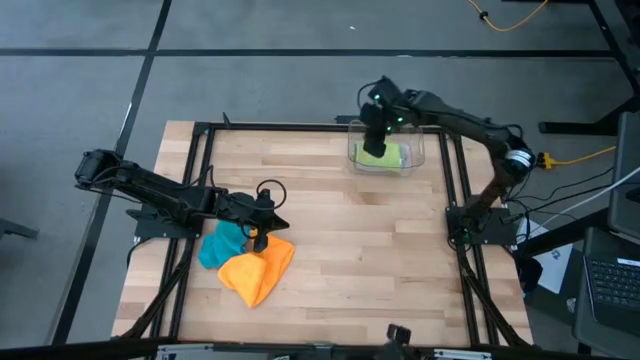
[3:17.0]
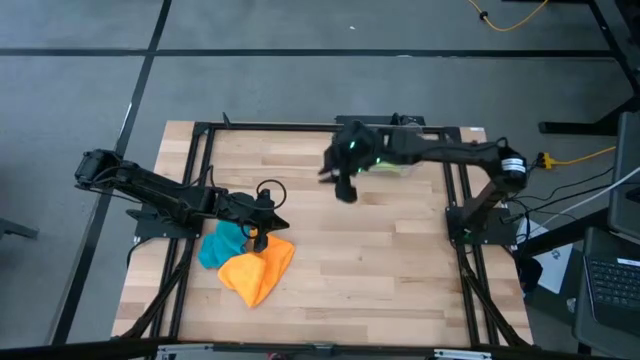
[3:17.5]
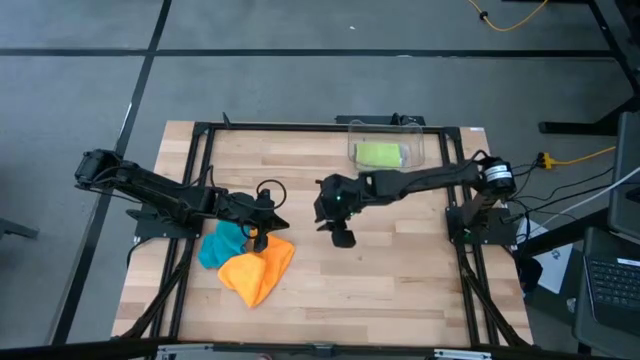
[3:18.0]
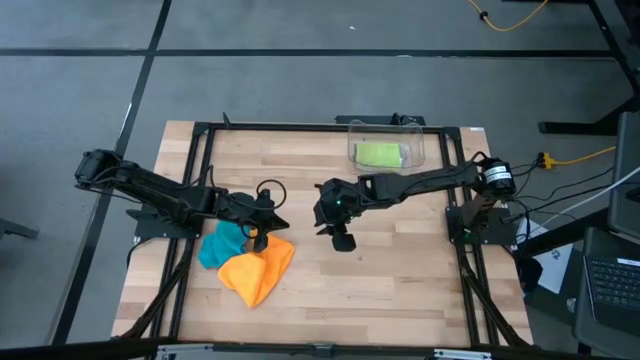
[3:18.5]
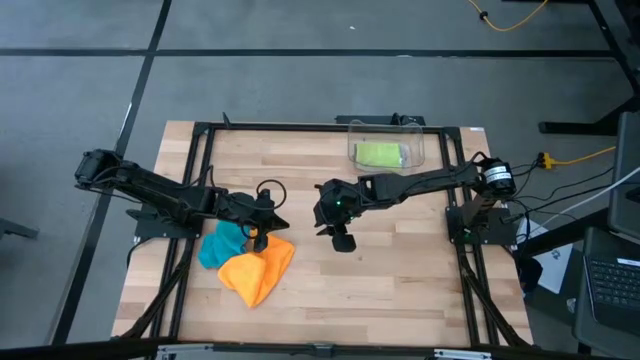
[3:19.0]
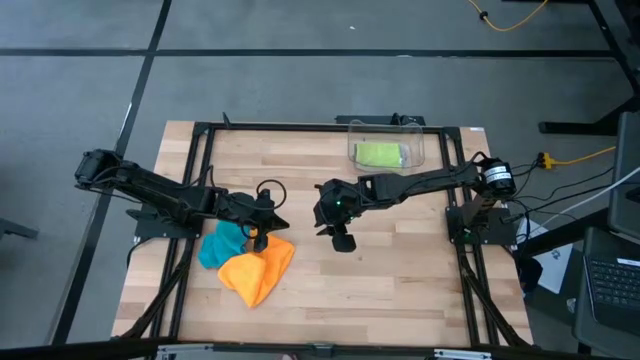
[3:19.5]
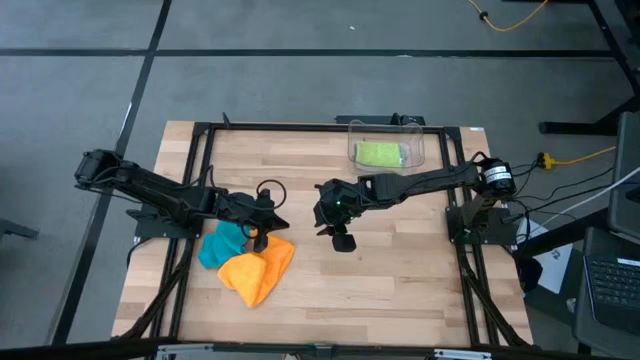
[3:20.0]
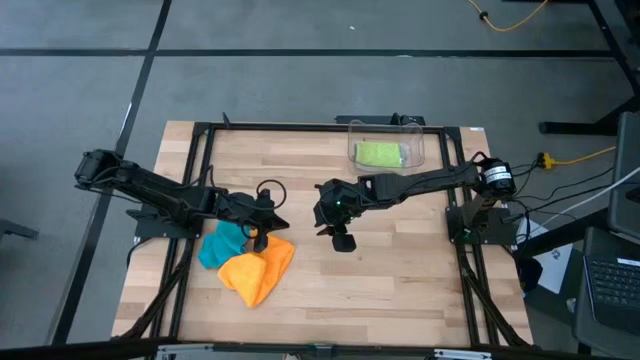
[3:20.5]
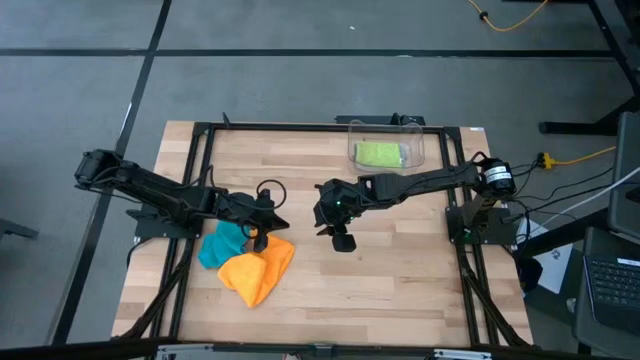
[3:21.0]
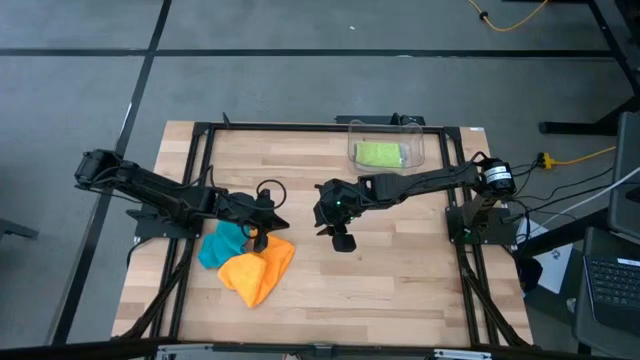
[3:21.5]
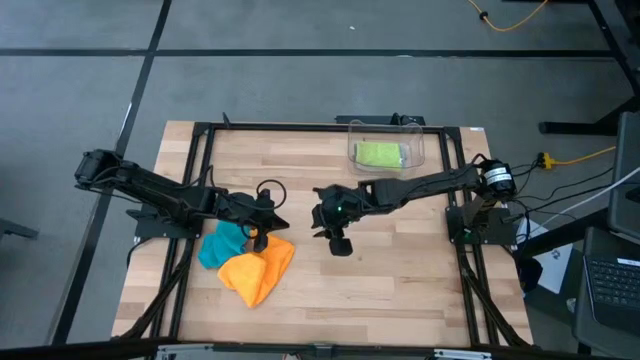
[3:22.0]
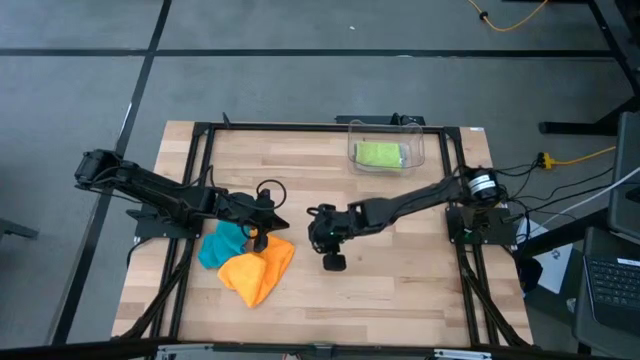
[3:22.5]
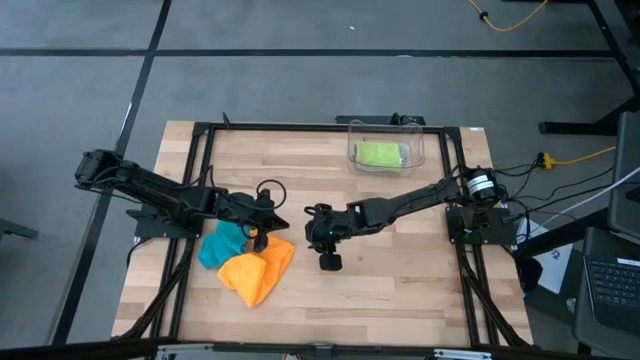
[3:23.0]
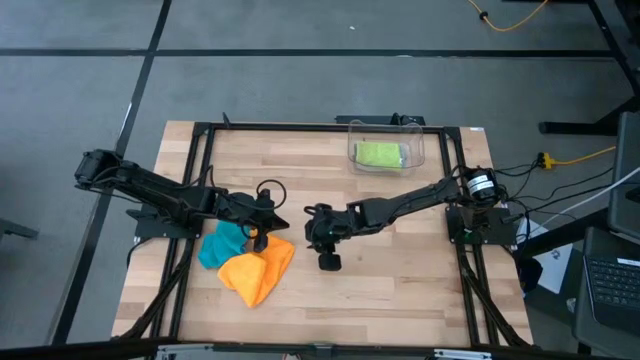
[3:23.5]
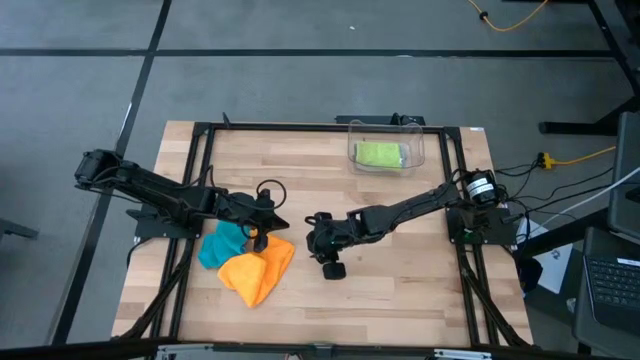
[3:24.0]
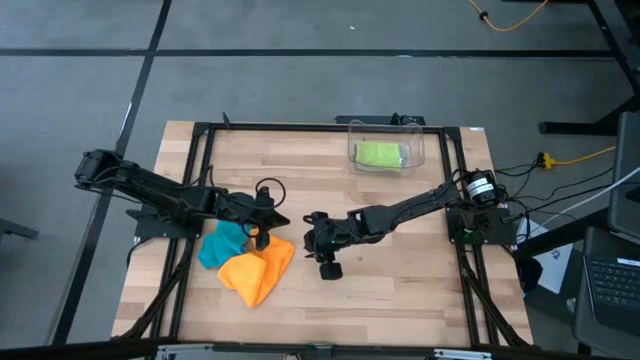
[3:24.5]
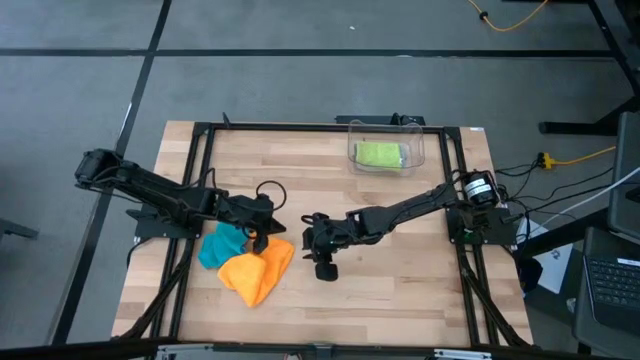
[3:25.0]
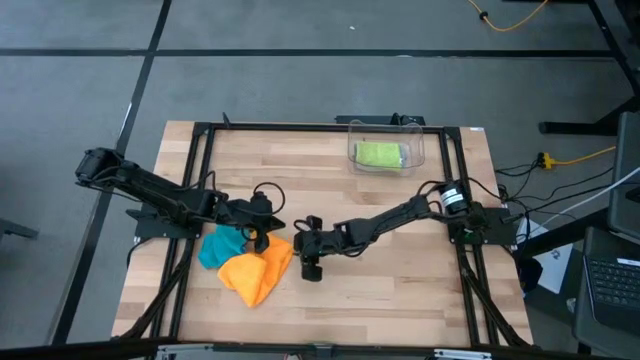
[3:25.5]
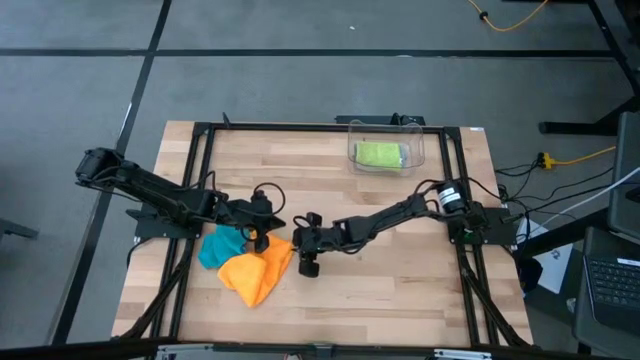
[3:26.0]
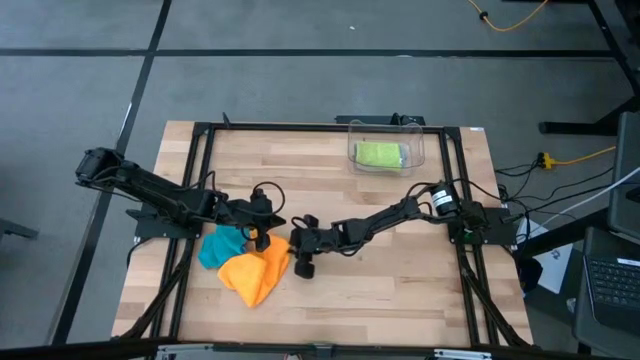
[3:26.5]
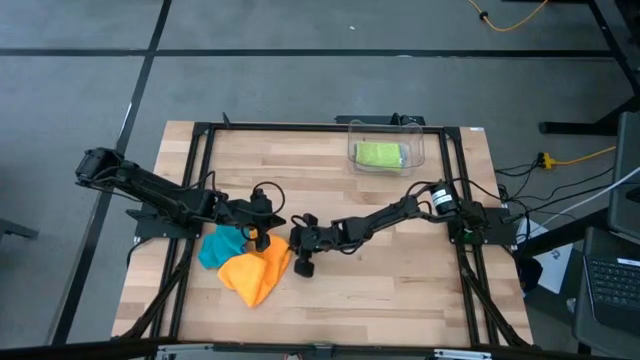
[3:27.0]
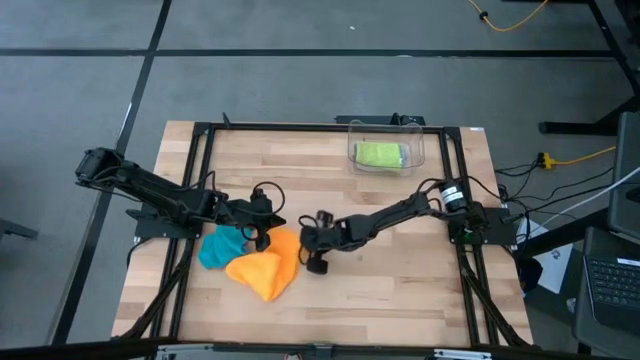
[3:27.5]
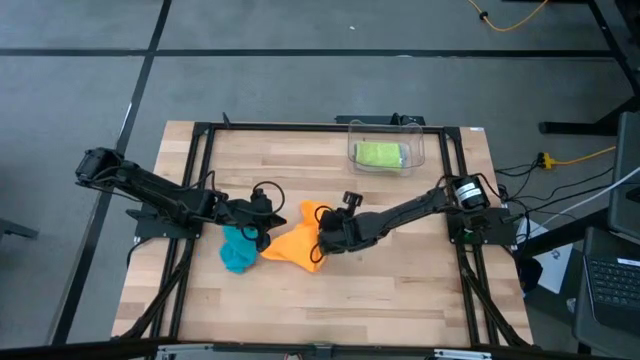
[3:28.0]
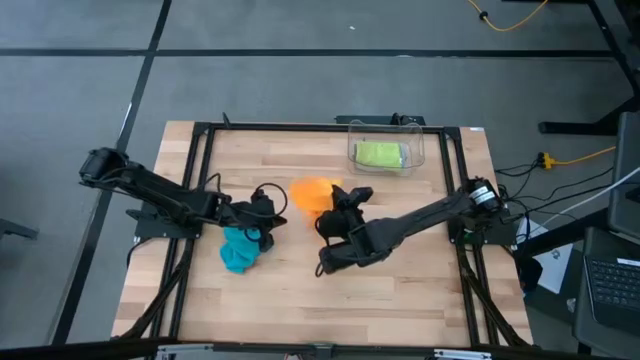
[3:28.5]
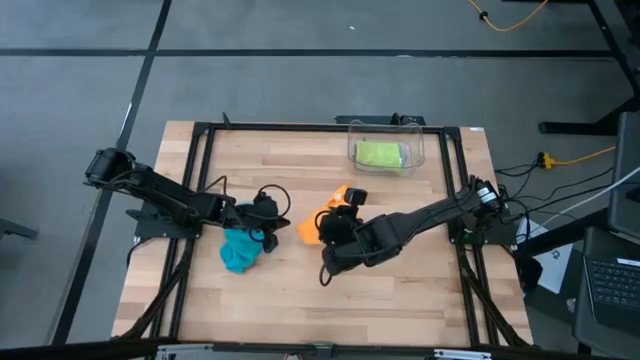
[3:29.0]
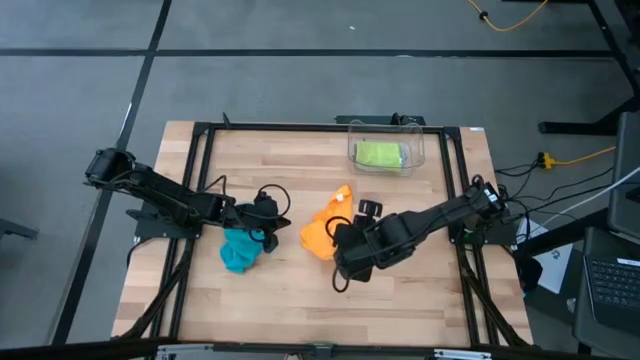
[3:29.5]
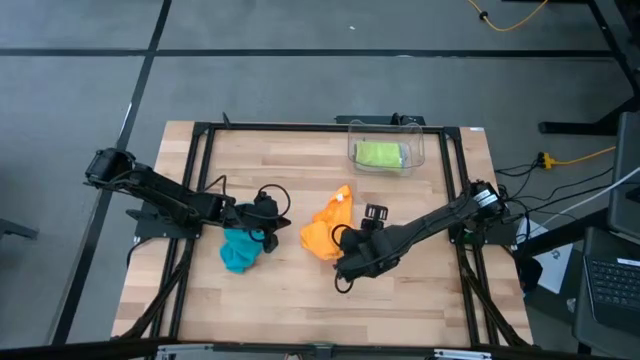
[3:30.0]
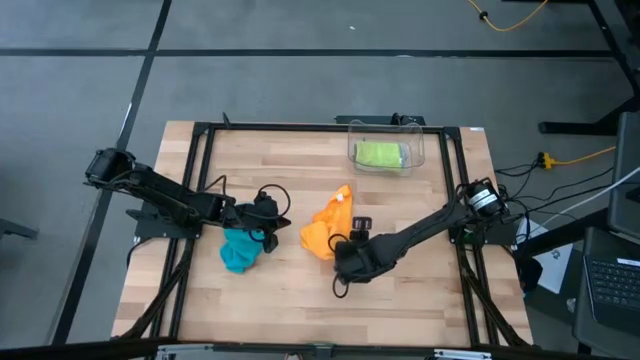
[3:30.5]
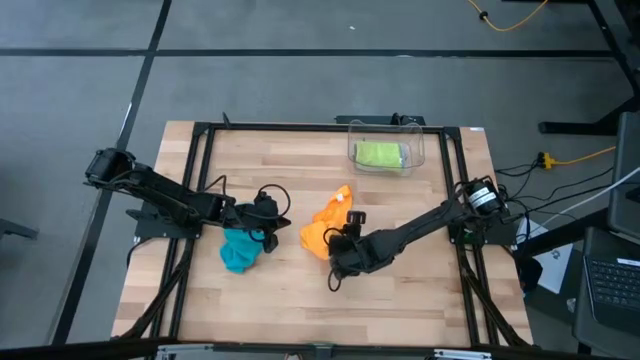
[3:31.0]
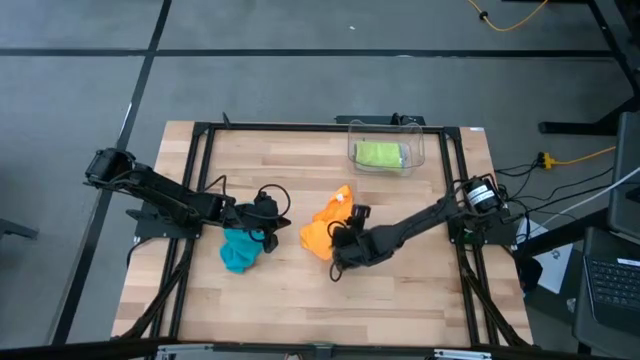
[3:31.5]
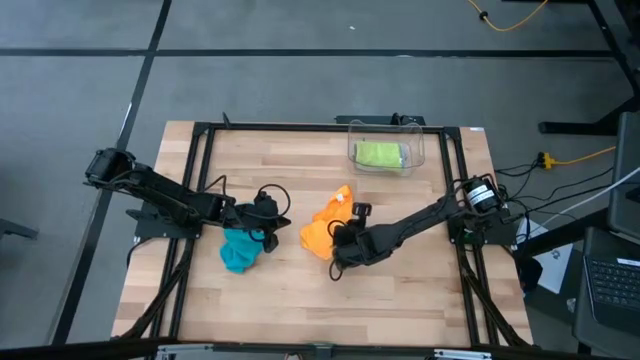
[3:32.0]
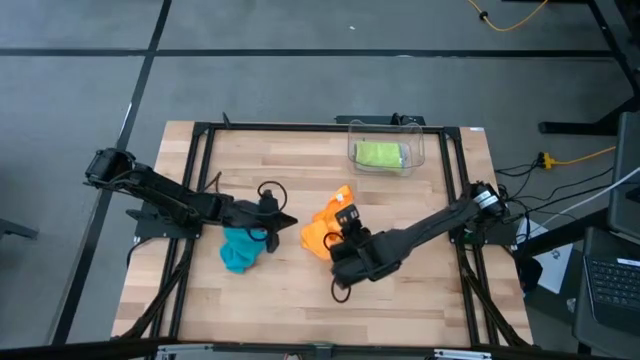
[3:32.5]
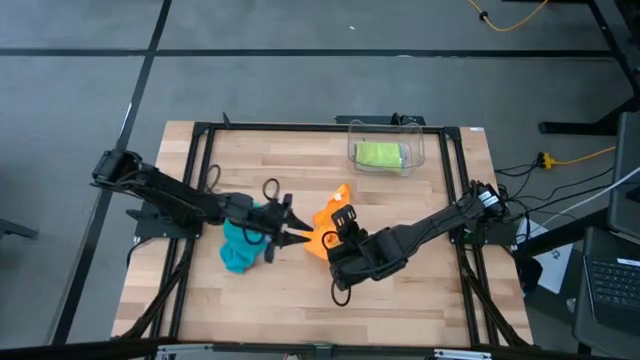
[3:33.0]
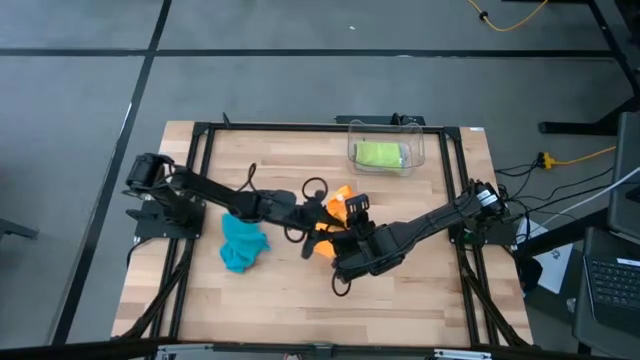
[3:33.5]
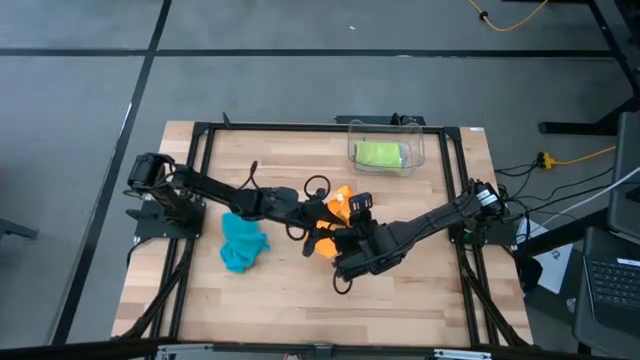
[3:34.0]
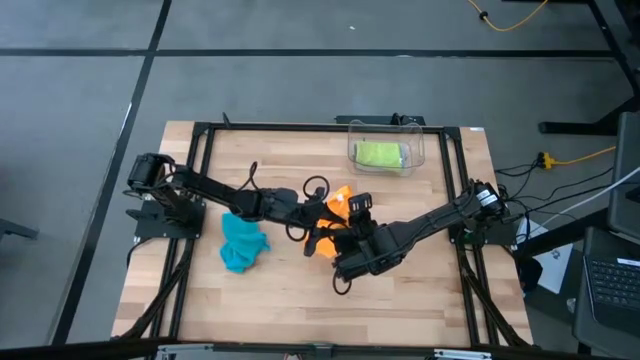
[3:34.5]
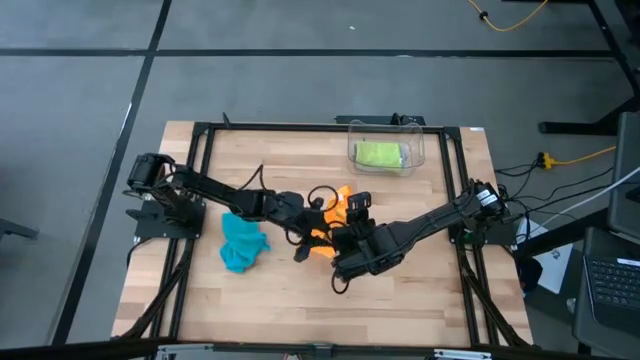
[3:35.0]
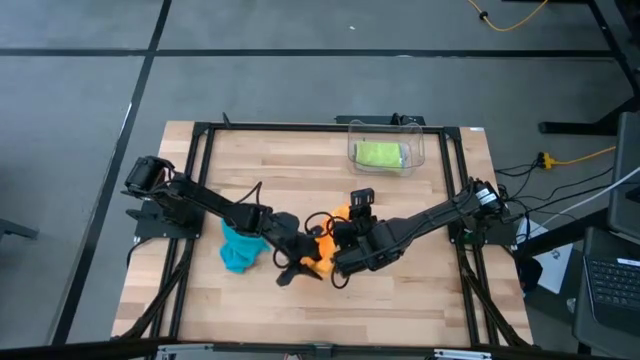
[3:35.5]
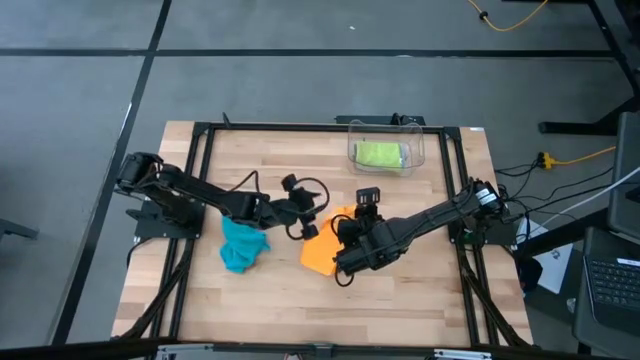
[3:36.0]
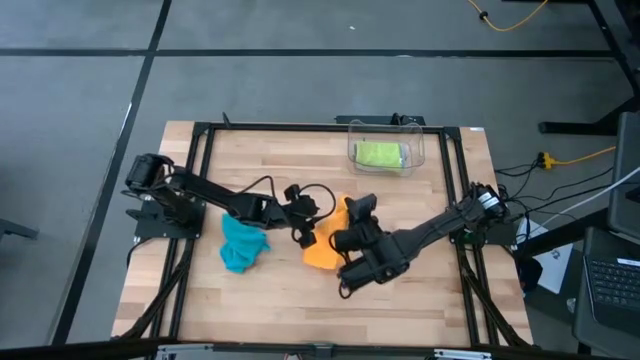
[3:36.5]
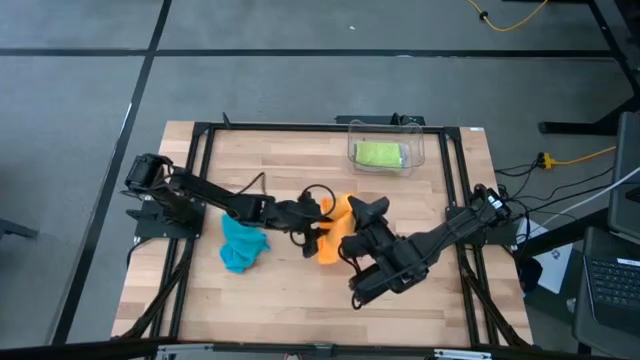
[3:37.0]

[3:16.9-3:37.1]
Task: Fold microfiber towels
Fold the orange microfiber

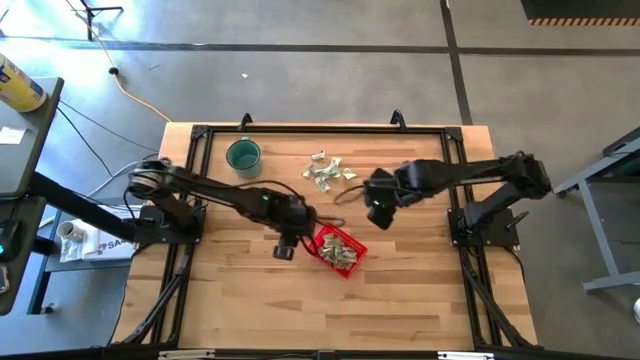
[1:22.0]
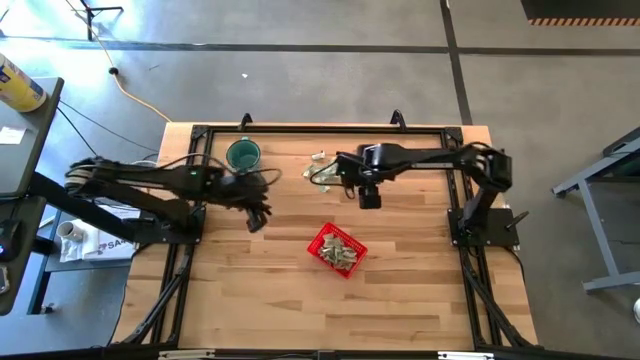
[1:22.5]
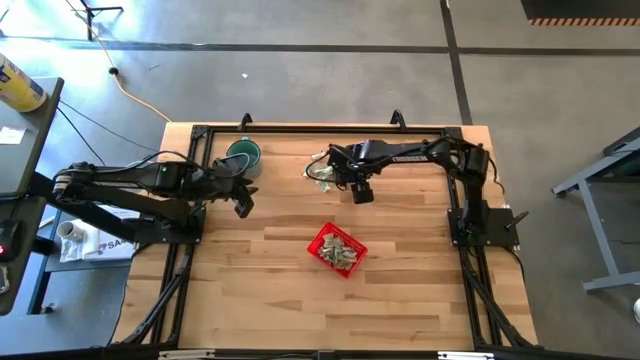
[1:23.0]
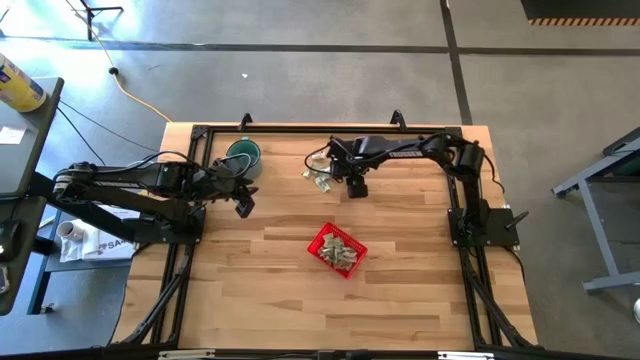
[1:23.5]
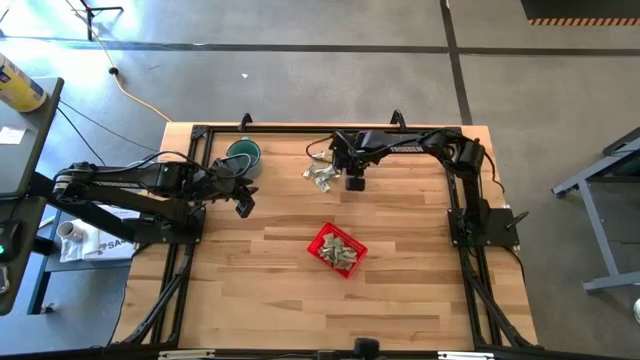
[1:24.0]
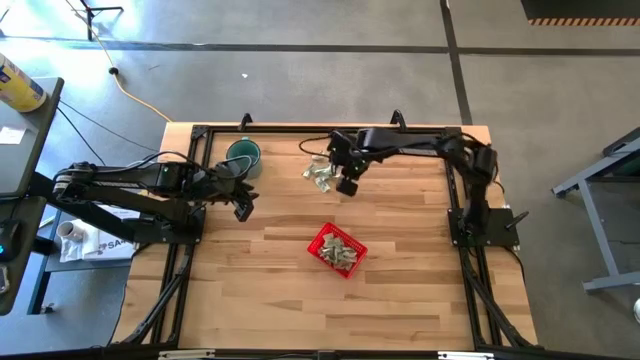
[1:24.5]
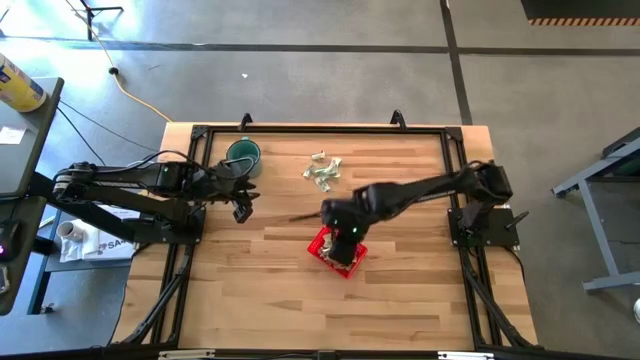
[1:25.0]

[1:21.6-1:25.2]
Task: Pick and place Stevia / Truvia into bins
Put the light green stevia packet into the bin
